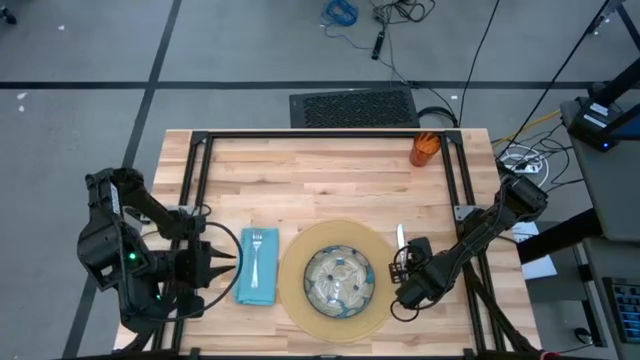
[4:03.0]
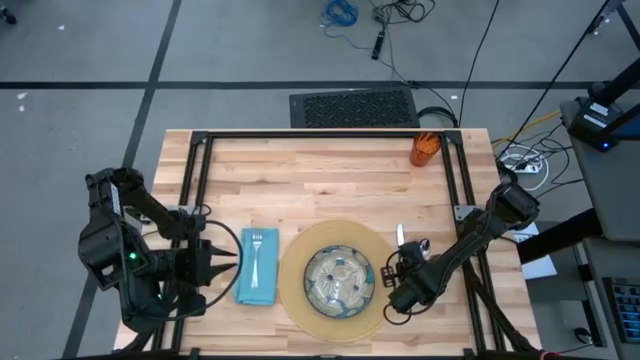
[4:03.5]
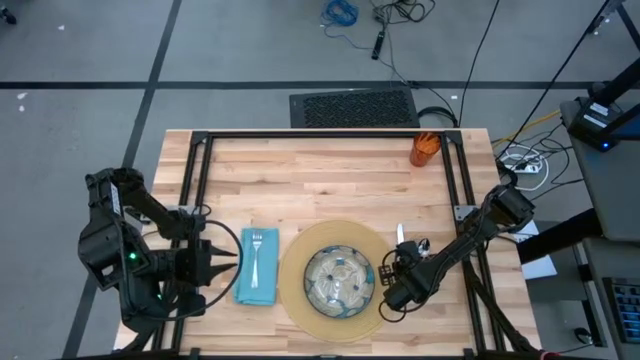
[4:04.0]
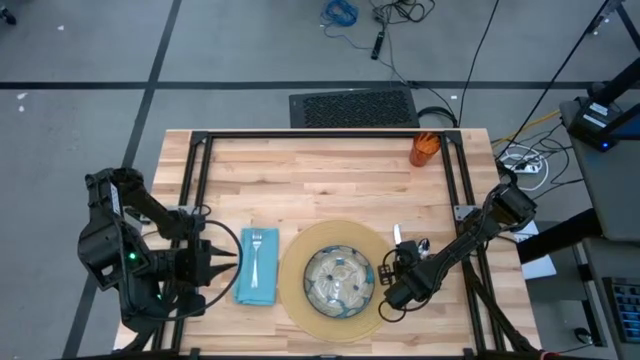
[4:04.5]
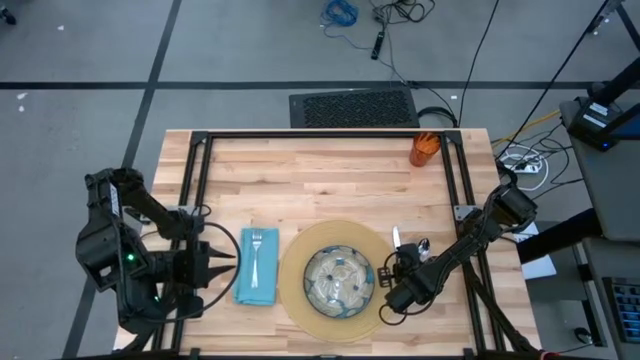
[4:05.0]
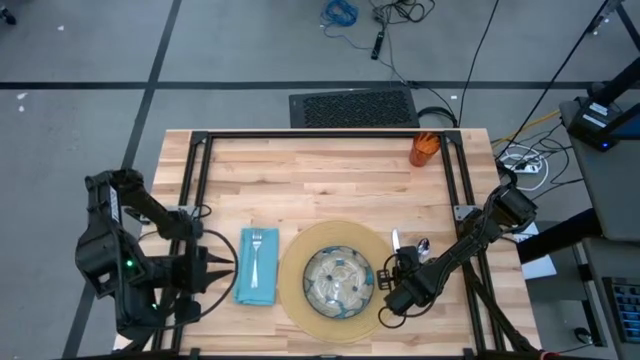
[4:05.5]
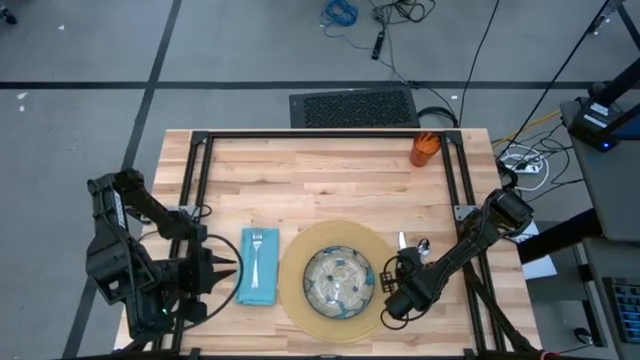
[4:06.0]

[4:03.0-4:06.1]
Task: Set table place
Adjust the silver knife on the table

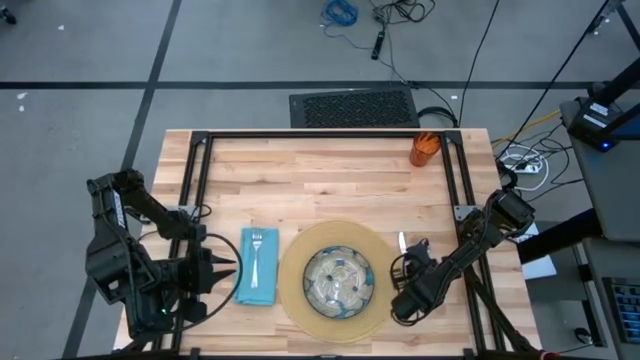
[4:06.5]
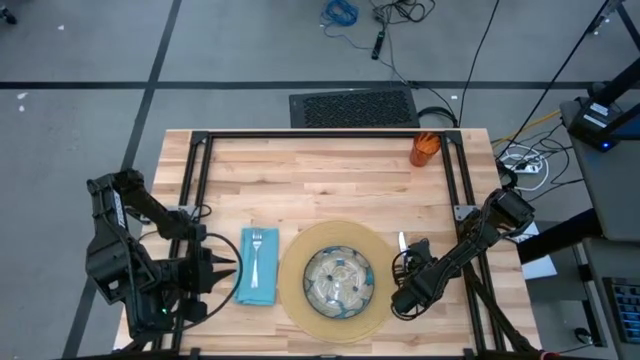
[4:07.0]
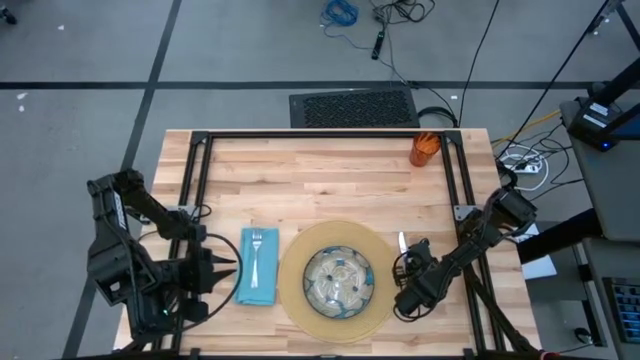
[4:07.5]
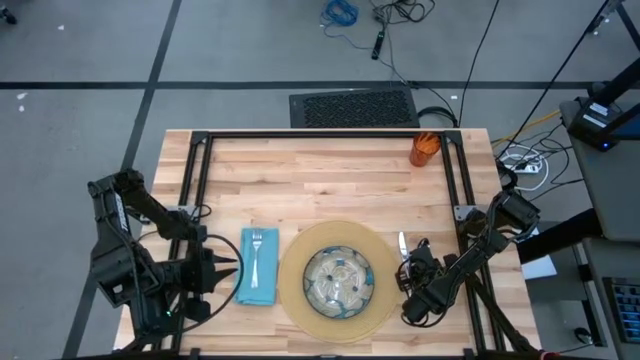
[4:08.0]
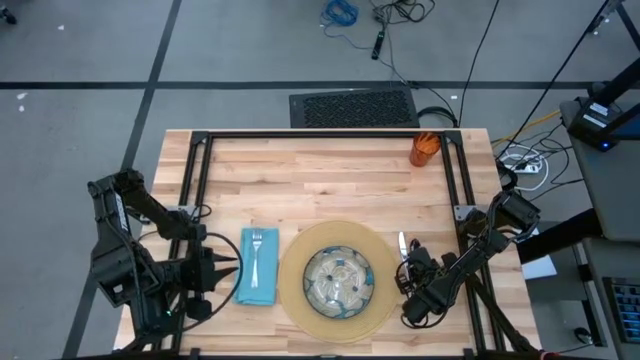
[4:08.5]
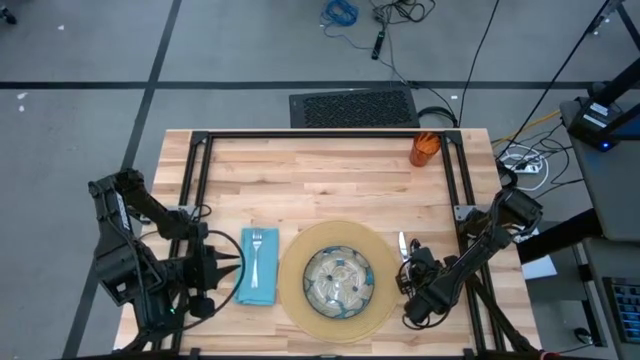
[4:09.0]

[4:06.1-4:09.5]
Adjust the silver spoon on the table

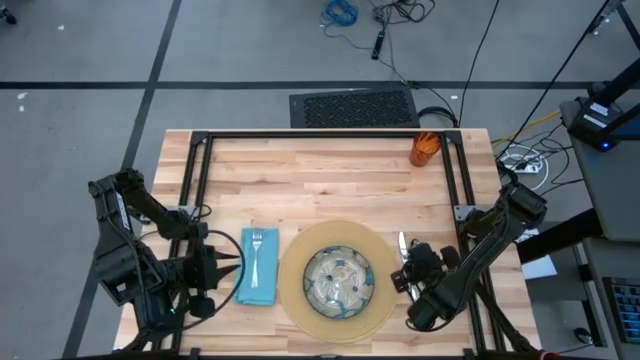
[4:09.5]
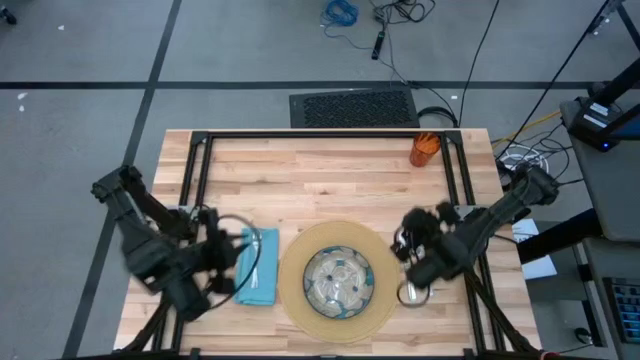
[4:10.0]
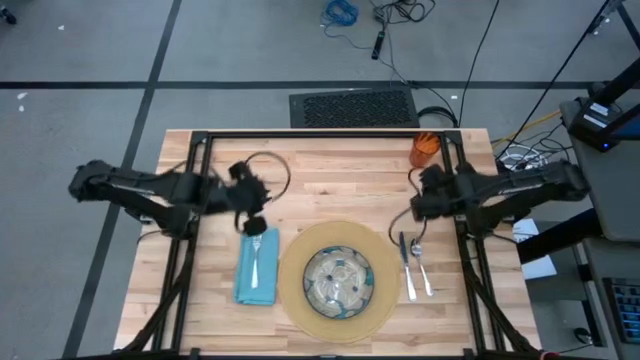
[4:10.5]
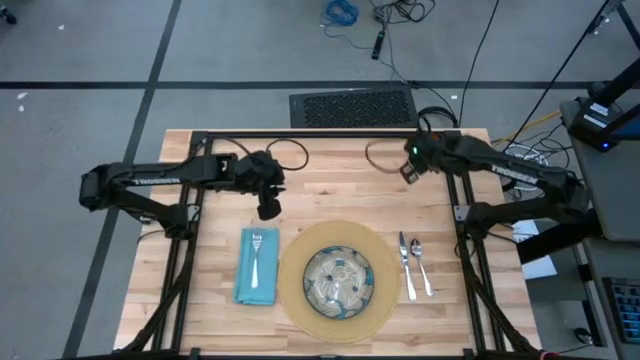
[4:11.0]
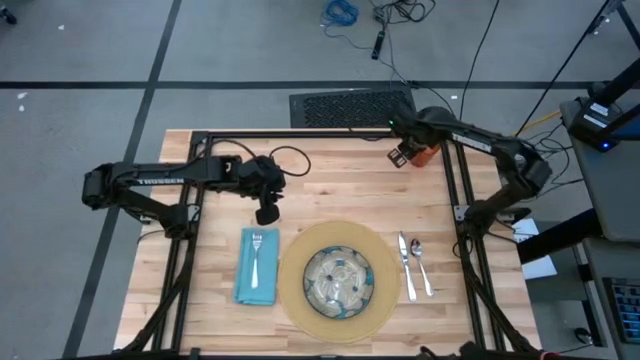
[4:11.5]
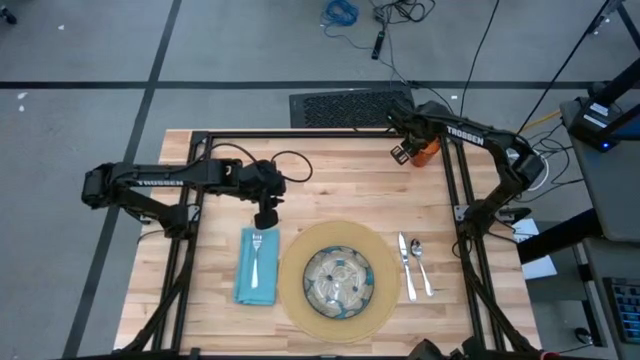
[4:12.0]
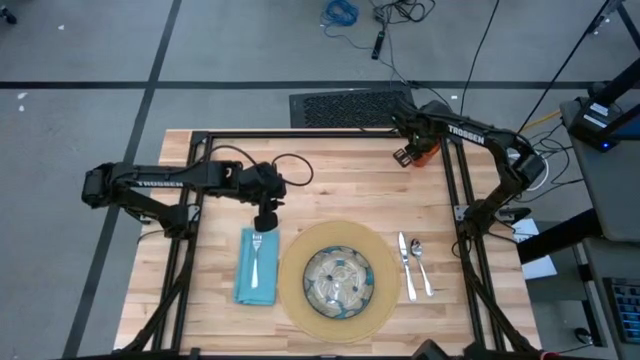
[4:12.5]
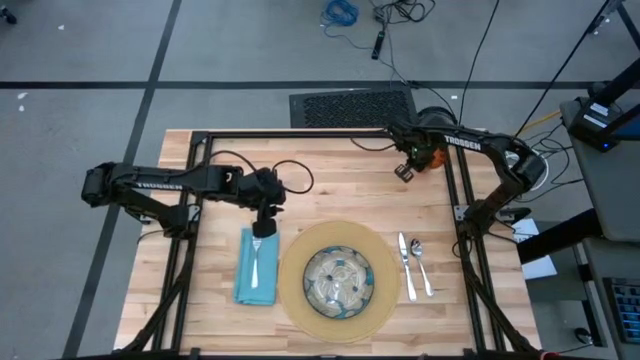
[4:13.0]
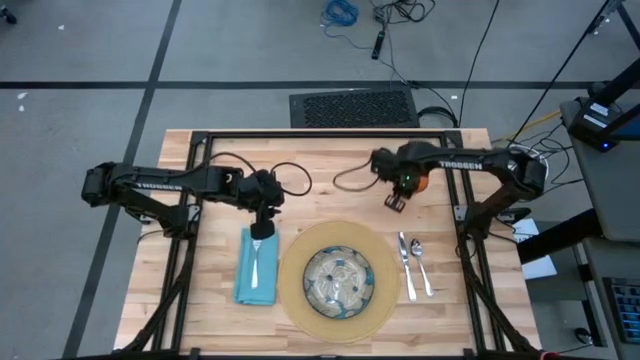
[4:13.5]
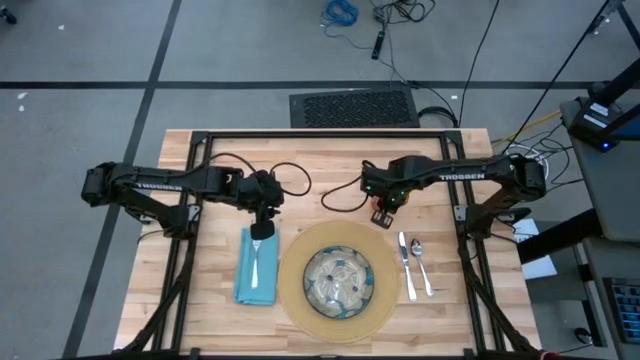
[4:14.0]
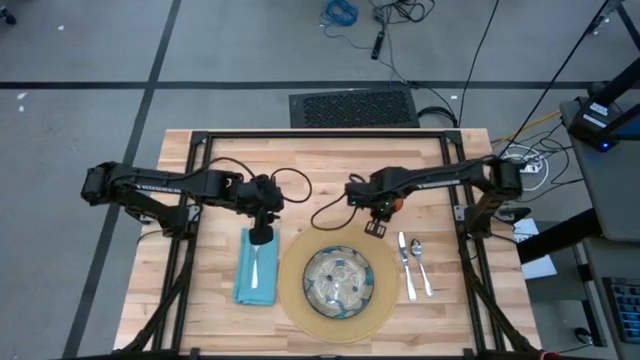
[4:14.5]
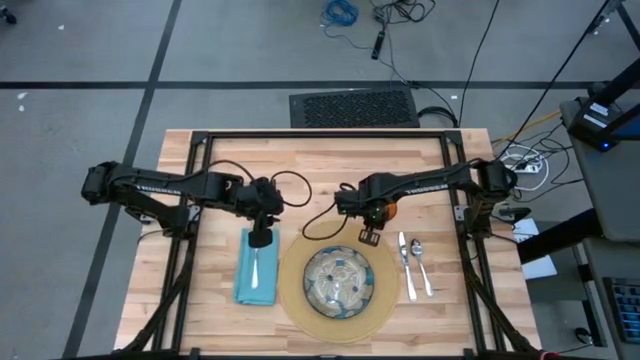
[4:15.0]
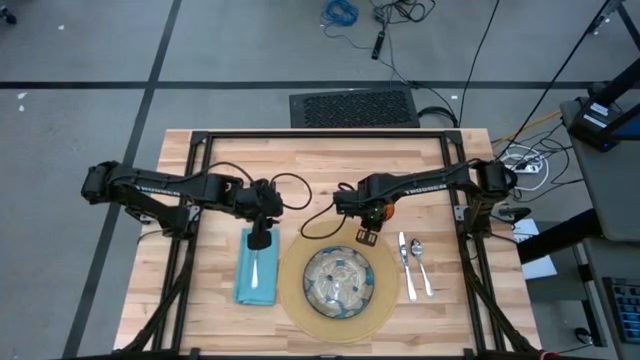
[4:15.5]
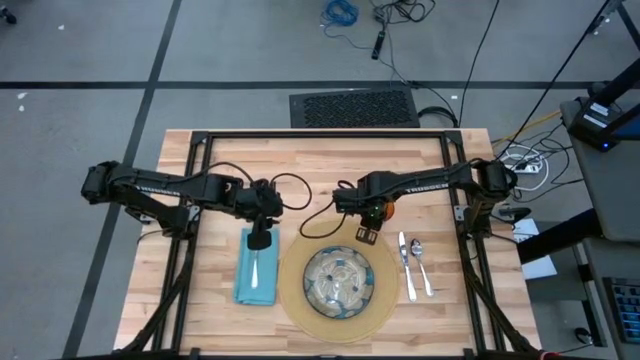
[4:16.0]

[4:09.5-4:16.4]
Put the brown cup on the top right of the brown placemat

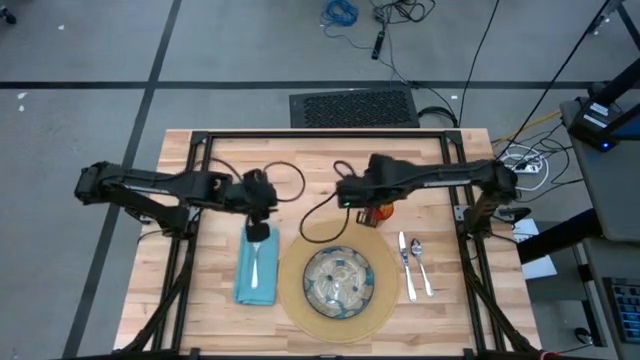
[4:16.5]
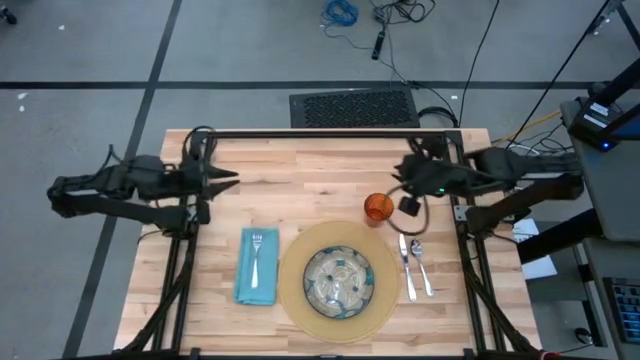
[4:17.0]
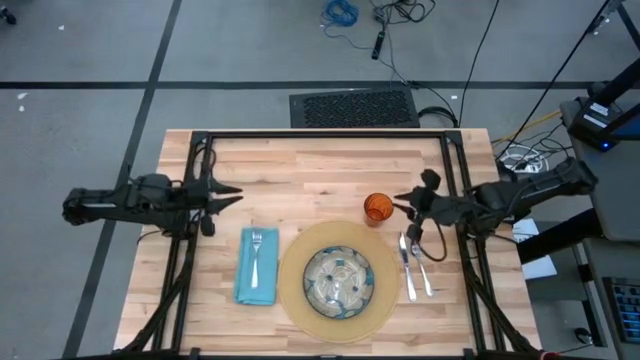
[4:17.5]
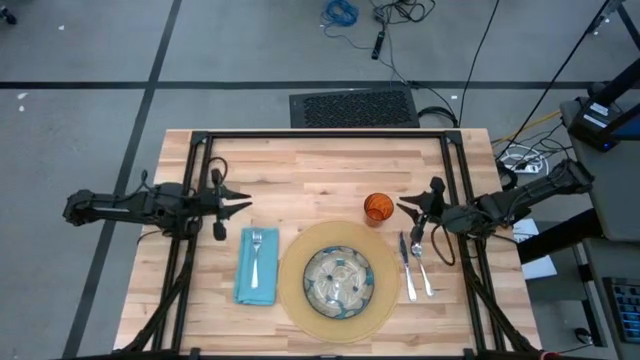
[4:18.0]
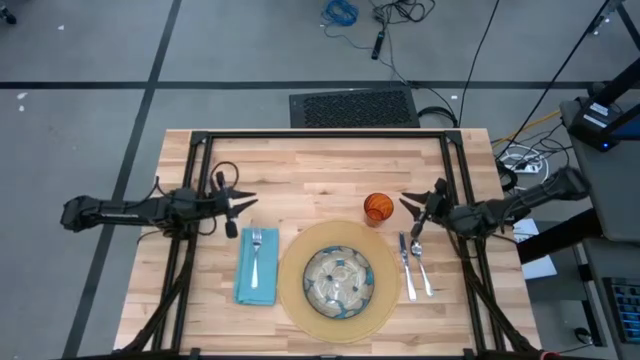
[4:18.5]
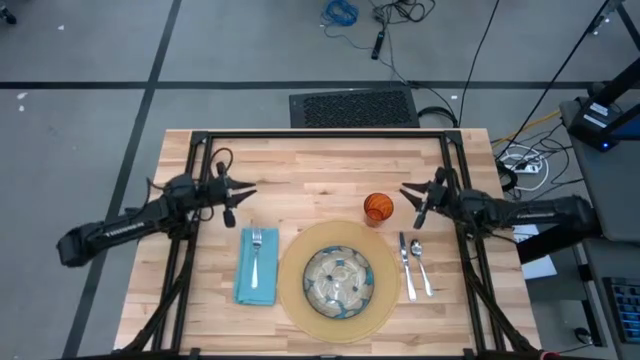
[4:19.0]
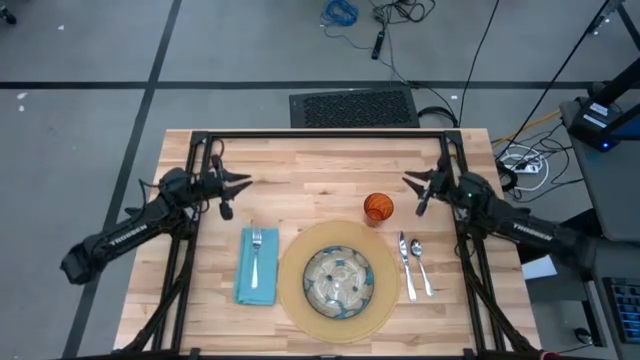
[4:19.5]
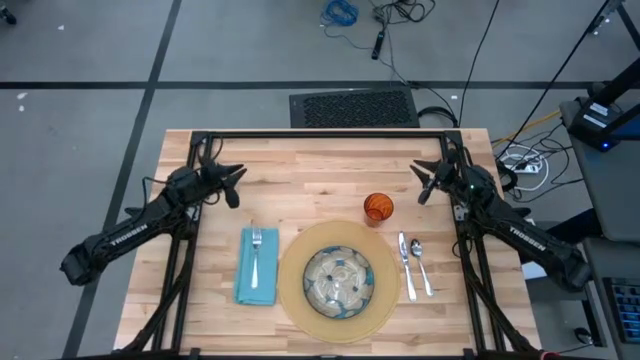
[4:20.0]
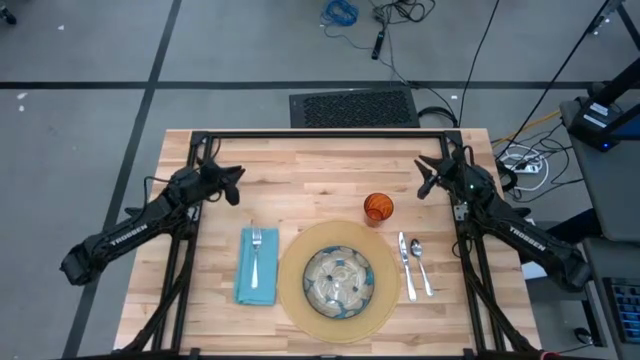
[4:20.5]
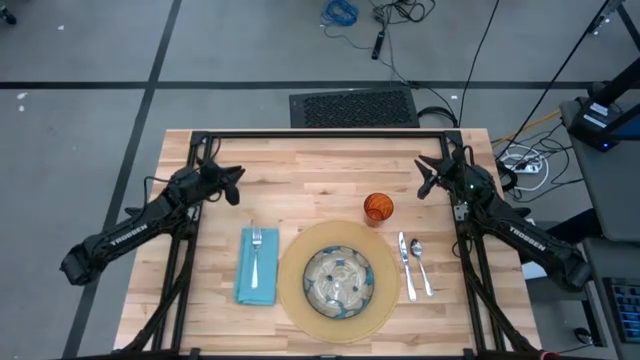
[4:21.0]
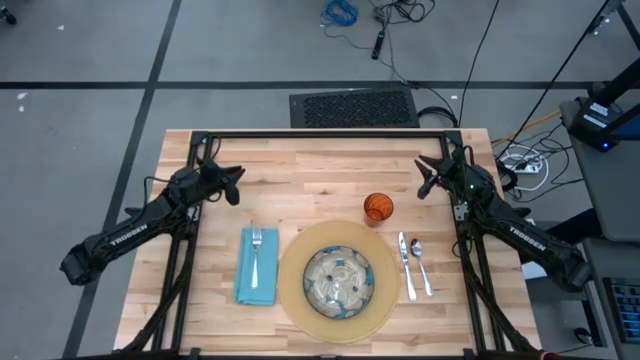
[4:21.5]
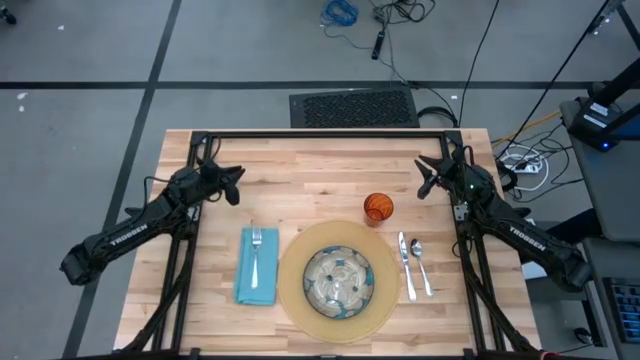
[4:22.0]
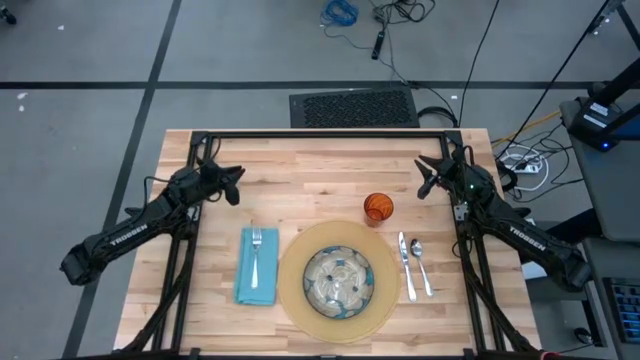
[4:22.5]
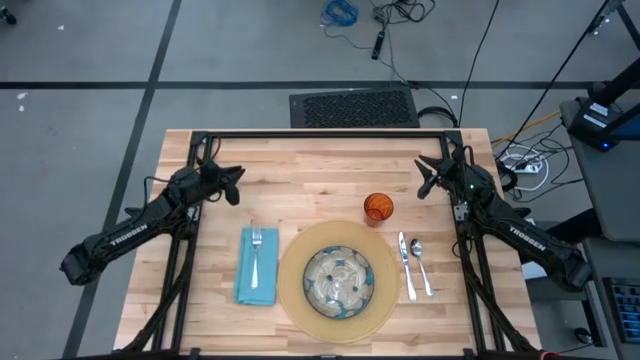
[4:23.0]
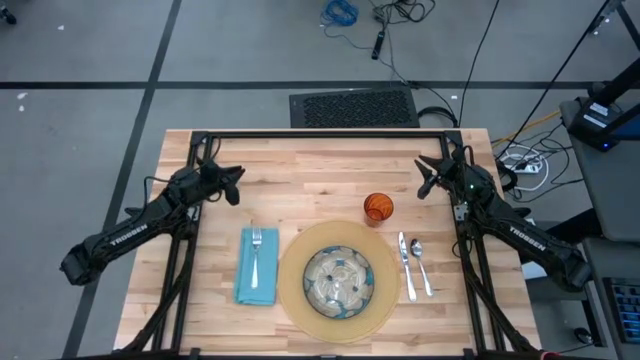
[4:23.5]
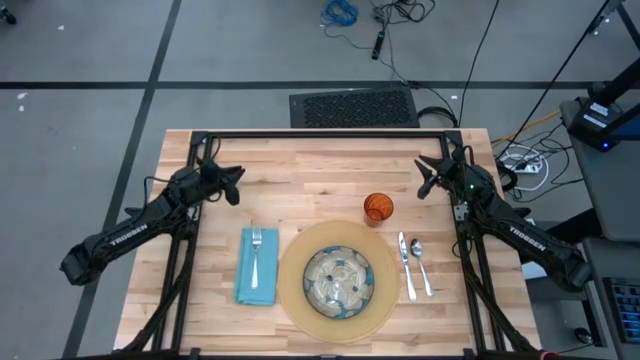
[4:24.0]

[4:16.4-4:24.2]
Return to Home Position
